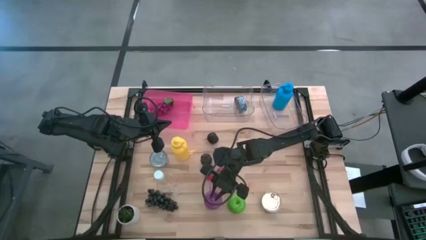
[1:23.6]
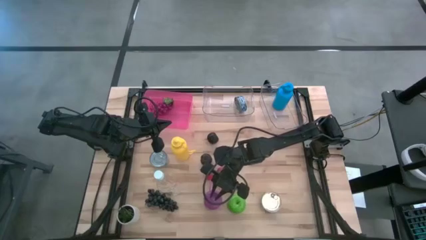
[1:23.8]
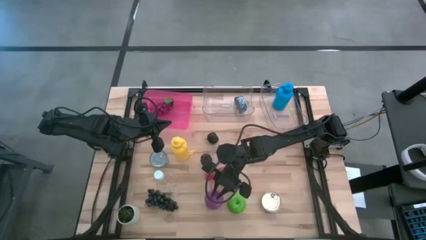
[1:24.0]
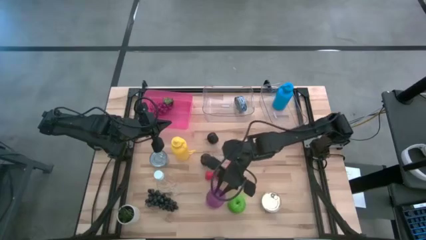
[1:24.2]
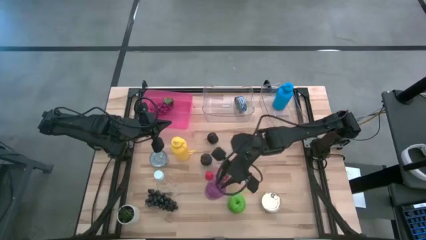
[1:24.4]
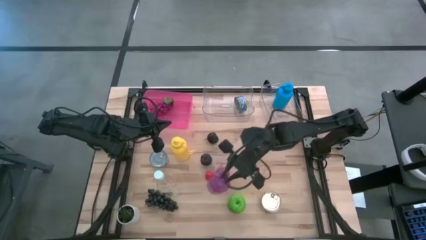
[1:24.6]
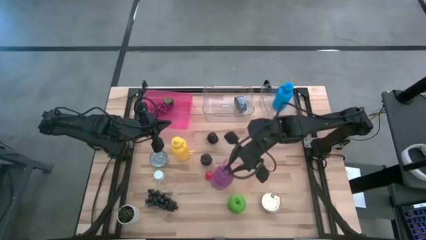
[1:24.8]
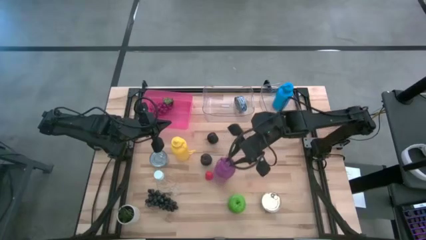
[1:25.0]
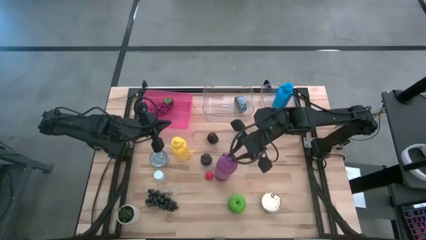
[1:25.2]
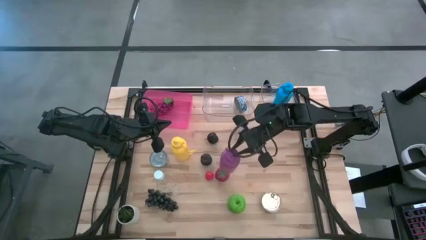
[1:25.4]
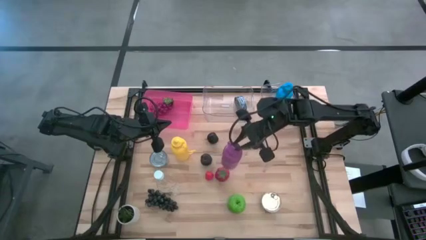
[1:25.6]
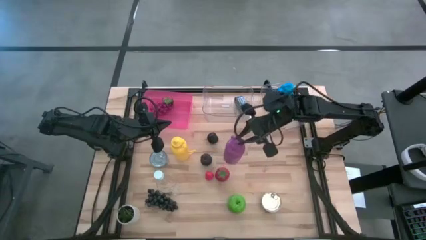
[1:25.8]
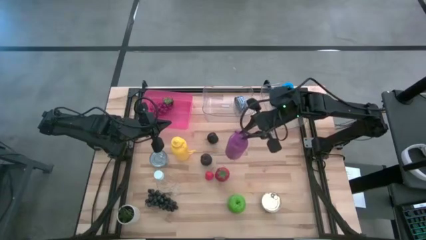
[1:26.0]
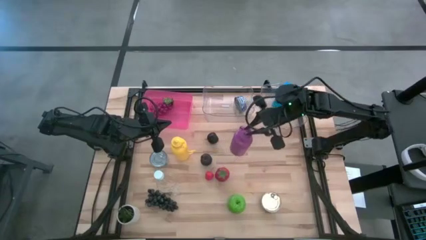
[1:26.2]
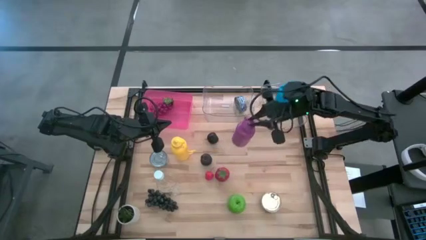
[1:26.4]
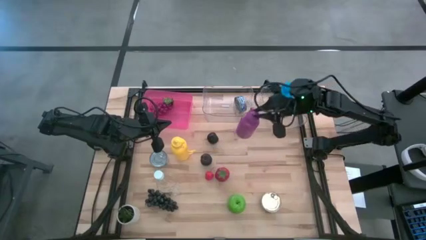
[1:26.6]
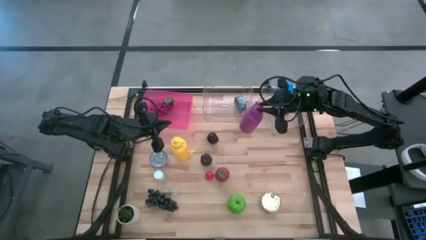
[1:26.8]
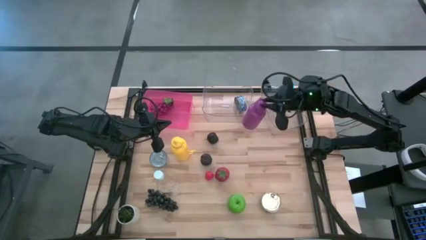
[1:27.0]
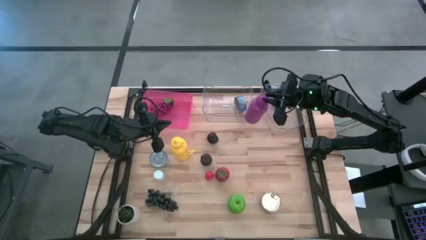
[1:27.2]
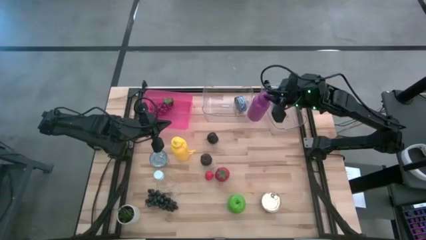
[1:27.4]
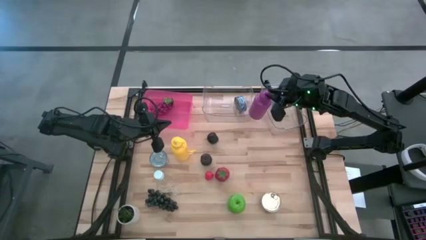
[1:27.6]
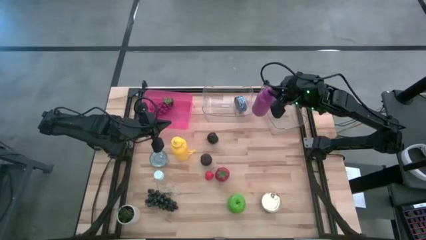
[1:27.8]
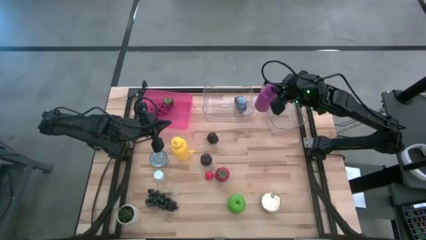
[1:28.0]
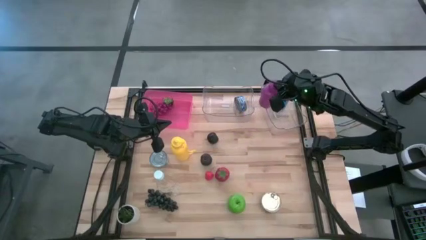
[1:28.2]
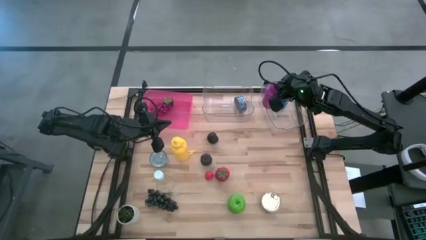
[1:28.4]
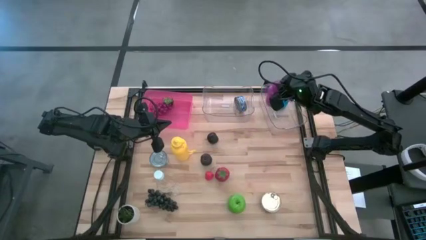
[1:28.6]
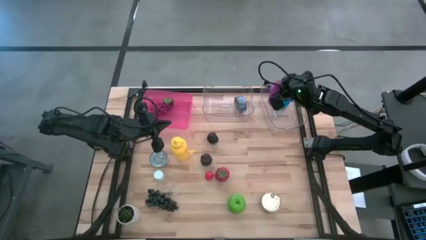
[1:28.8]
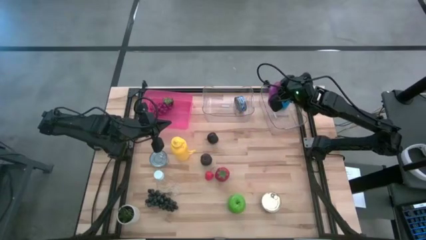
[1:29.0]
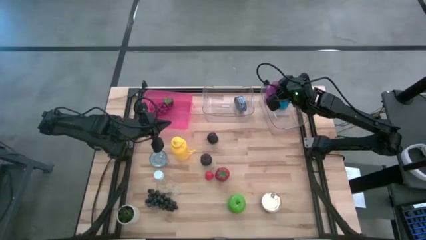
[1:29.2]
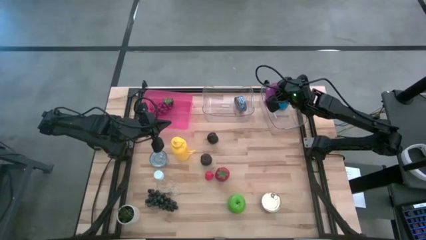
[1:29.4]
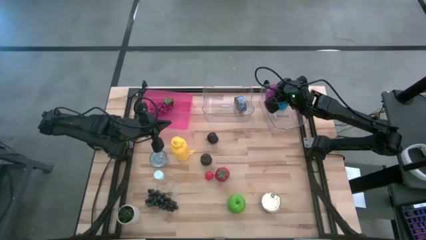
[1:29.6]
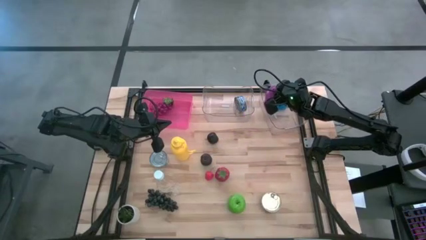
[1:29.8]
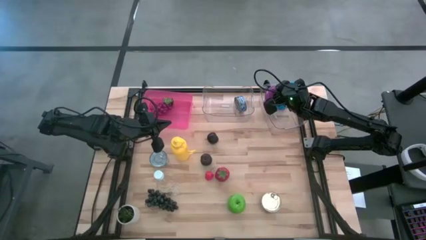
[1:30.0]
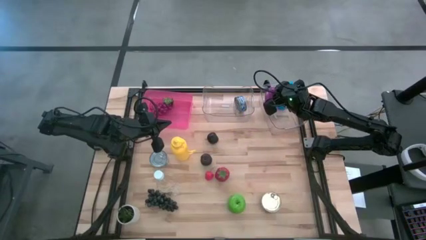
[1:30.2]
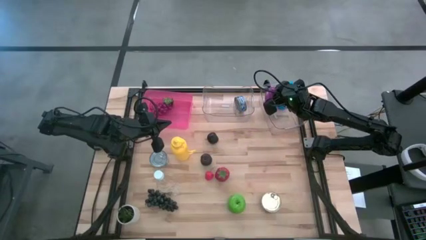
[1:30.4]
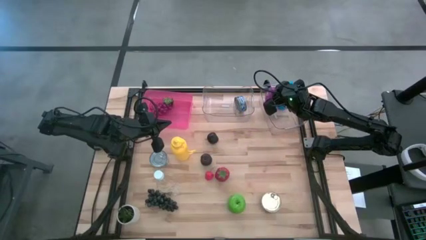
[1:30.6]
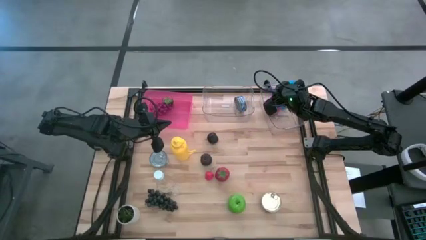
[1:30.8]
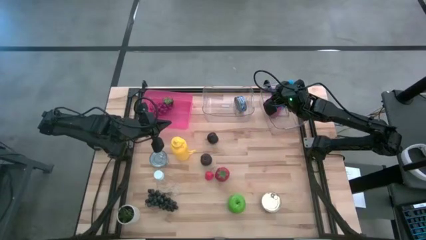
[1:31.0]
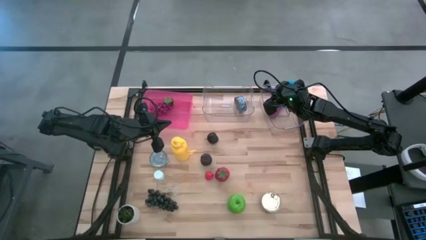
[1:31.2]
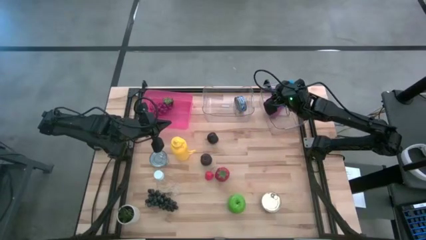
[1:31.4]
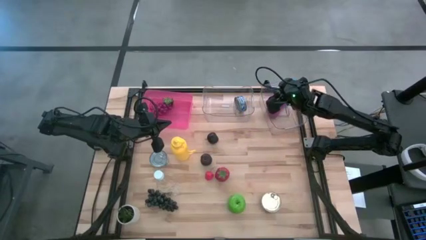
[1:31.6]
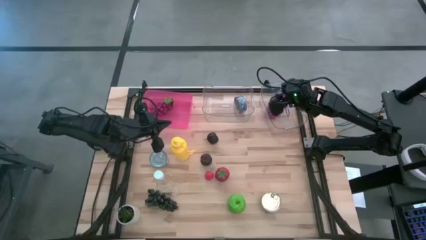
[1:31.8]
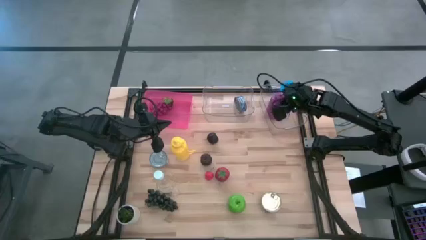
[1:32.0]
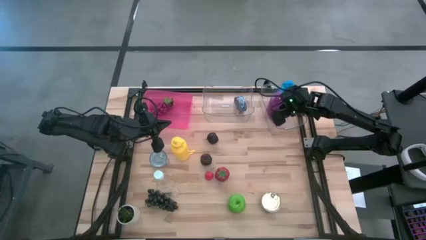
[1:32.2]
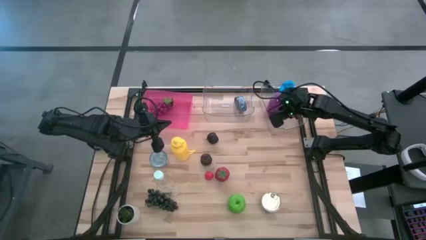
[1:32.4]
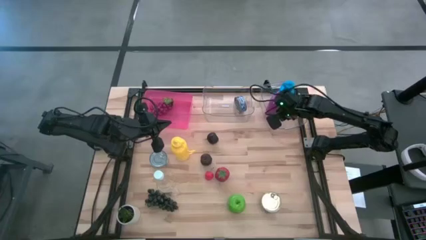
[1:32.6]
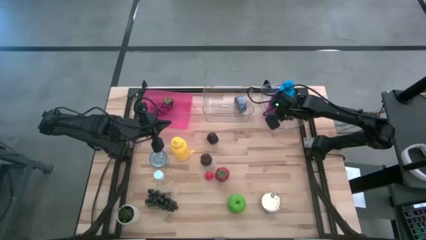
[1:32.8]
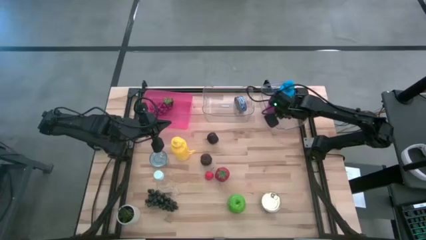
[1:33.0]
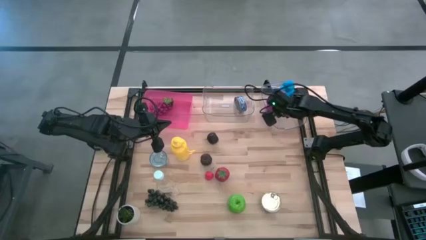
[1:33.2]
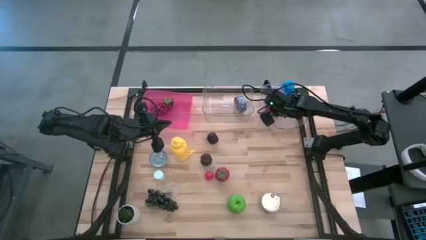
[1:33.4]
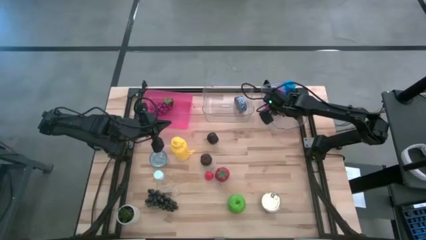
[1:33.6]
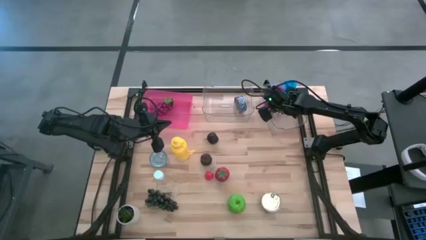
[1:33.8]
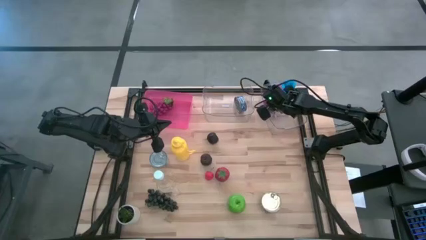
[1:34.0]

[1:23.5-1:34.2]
Task: Pick & Place Food Item
Put the purple water bottle into the right transparent bin

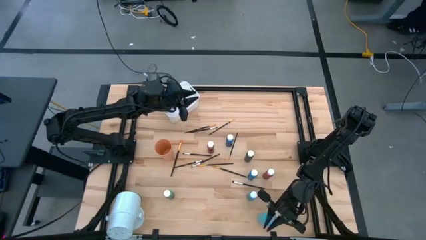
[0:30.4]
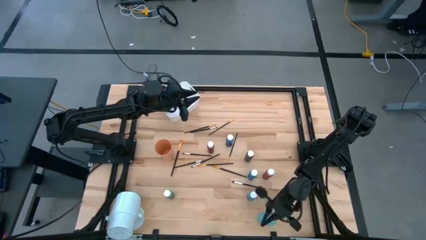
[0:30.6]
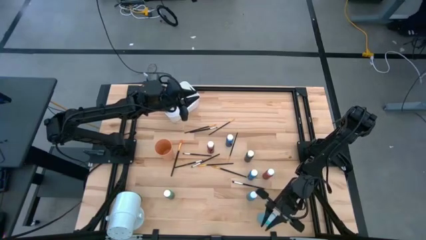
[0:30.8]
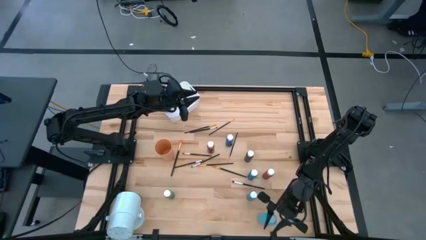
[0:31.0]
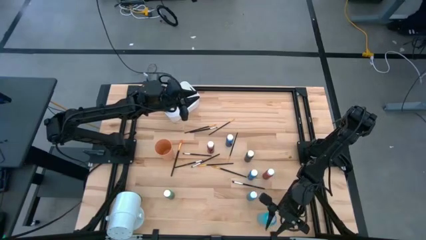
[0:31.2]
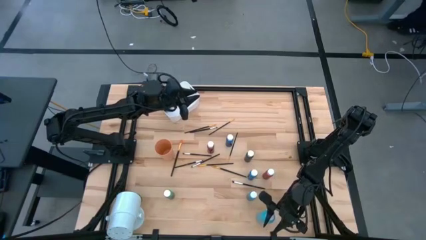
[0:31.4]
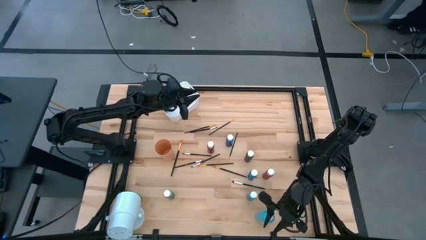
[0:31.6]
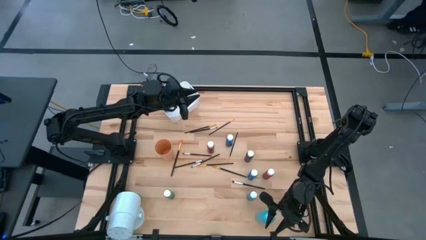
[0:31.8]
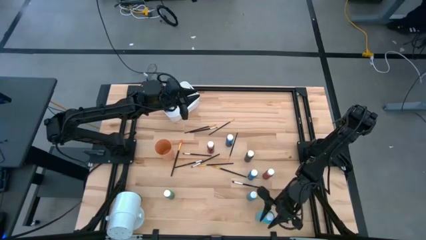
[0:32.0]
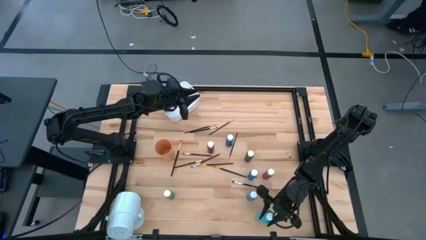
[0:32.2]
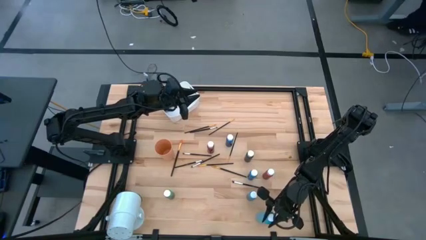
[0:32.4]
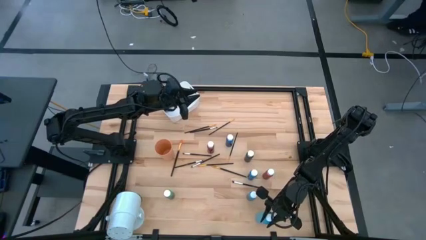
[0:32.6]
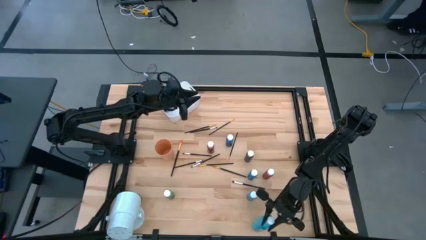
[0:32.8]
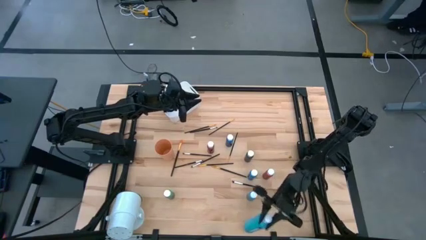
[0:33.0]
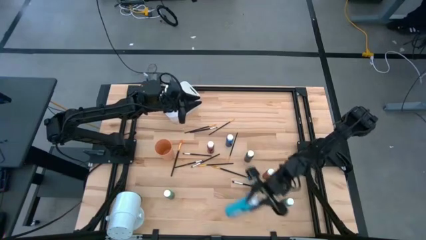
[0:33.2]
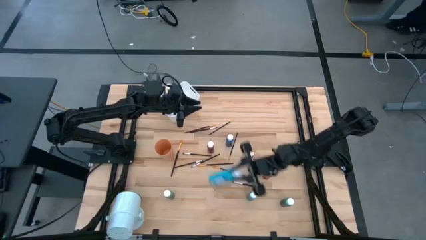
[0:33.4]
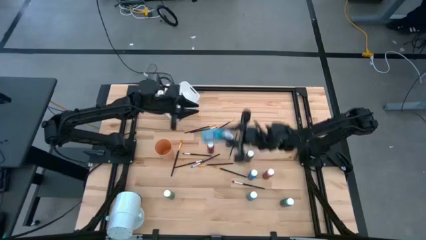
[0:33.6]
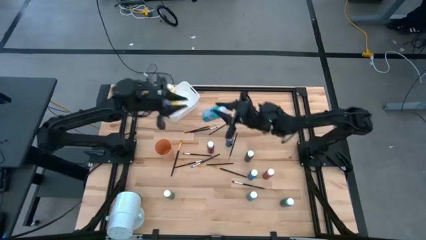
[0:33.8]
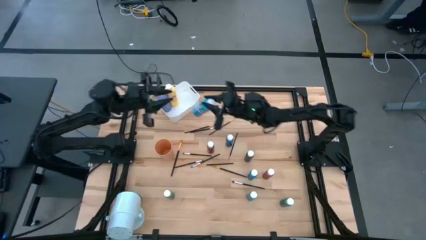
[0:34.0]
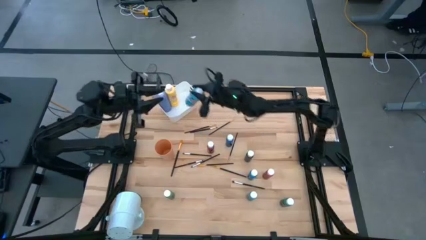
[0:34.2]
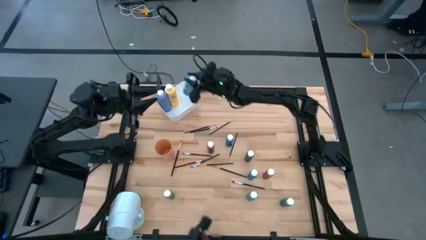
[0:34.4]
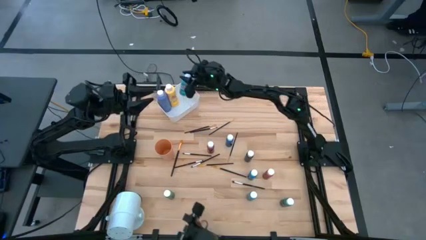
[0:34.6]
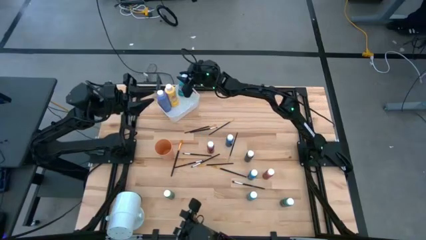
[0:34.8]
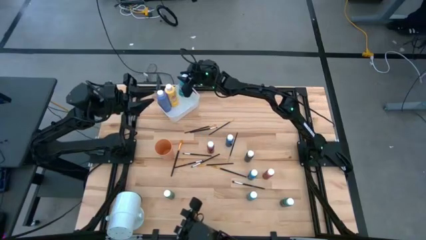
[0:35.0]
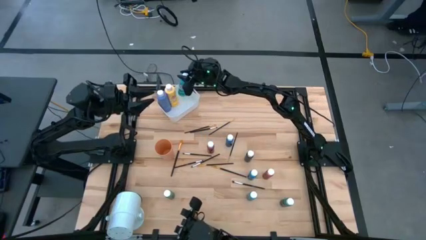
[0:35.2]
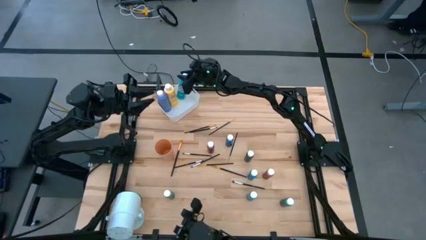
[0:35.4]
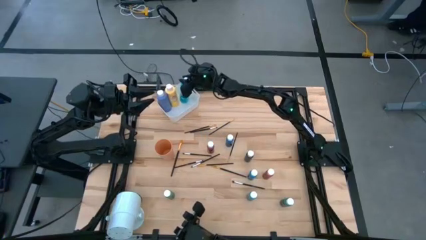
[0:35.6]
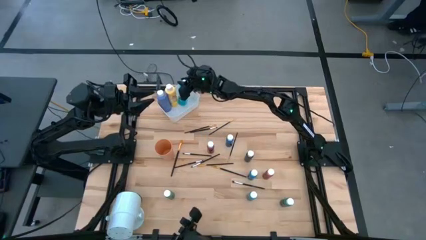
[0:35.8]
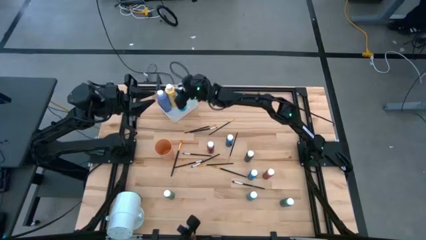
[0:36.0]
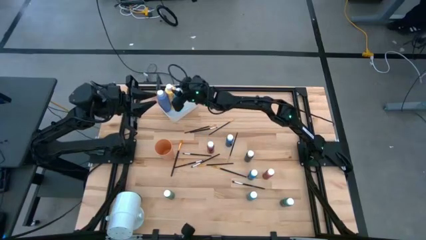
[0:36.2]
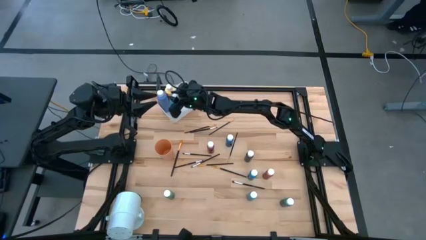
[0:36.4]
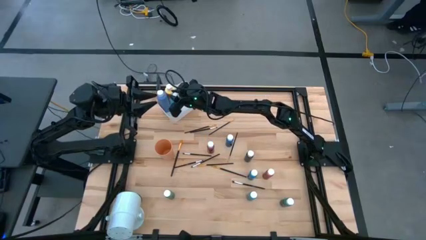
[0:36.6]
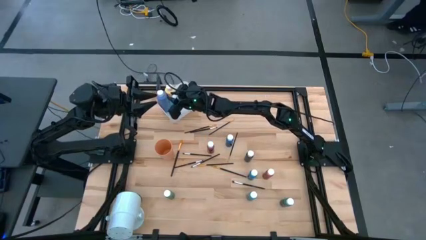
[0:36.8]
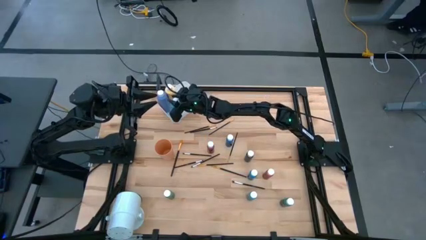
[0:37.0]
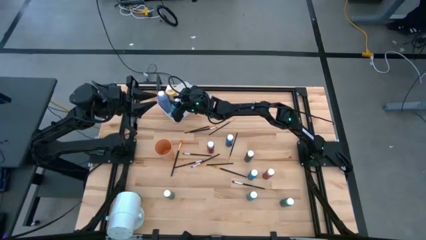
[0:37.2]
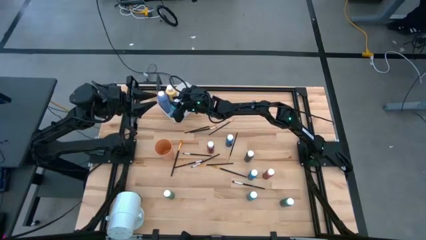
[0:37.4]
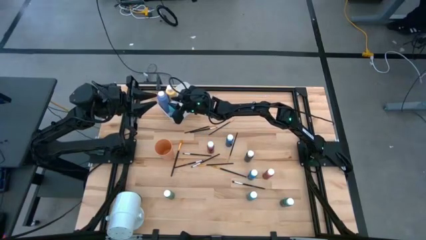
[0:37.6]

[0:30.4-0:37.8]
Task: Pick & Place Paint Supplies
Put the large light blue paint bottle into the white bin
